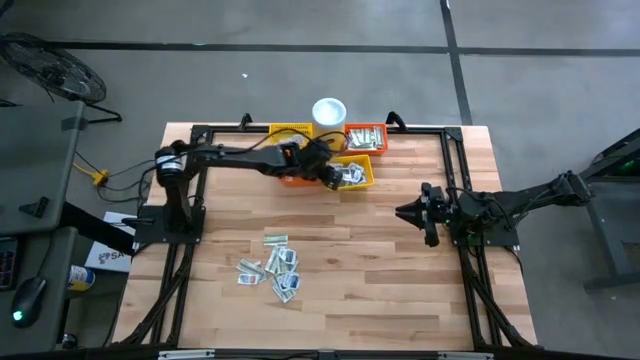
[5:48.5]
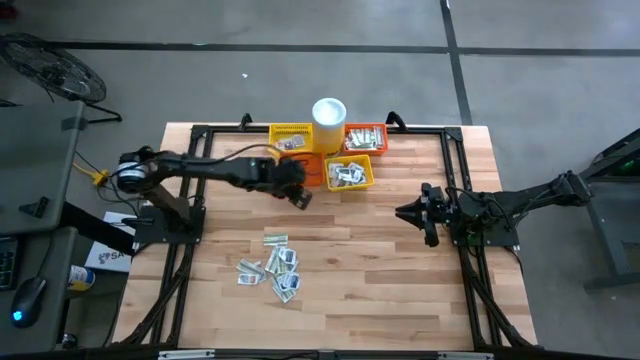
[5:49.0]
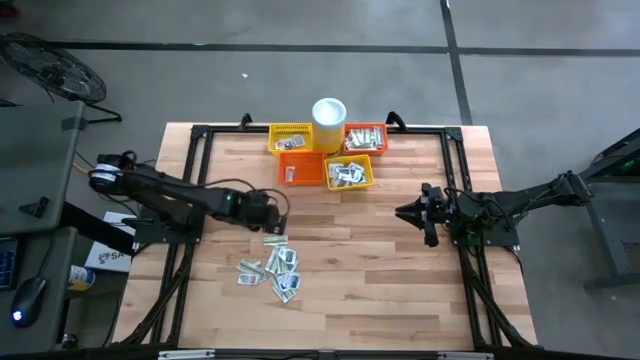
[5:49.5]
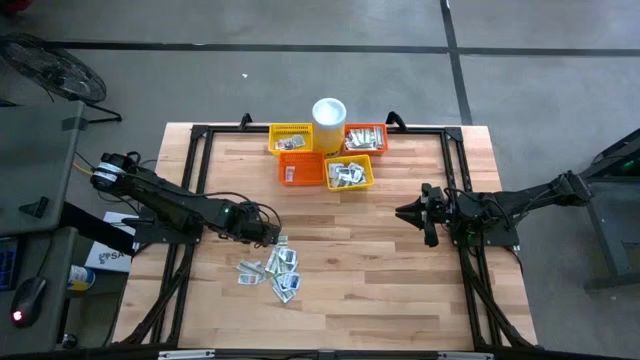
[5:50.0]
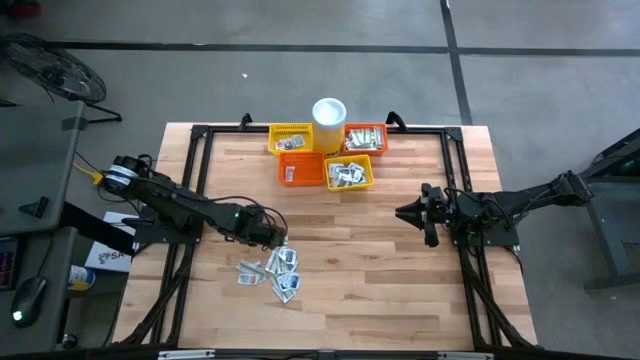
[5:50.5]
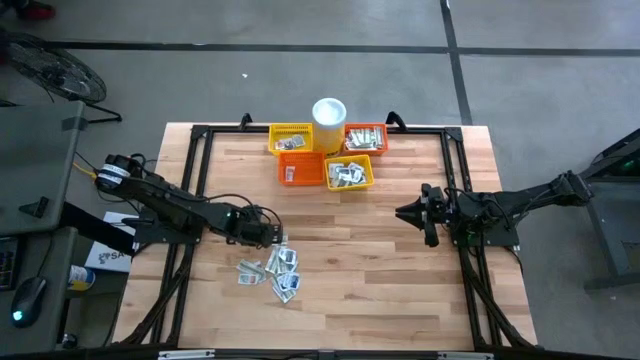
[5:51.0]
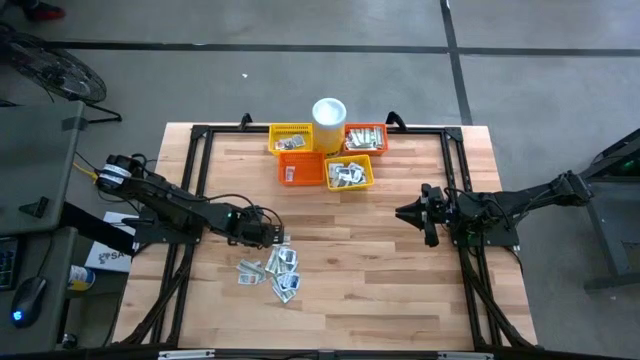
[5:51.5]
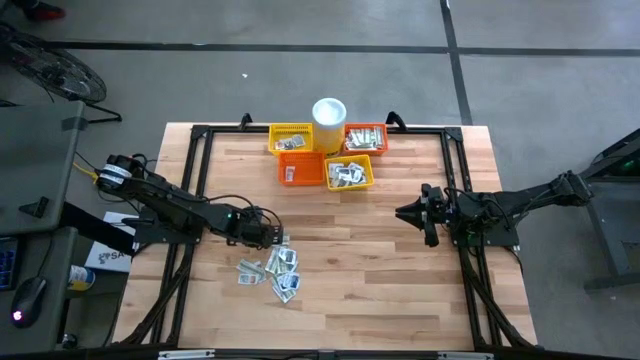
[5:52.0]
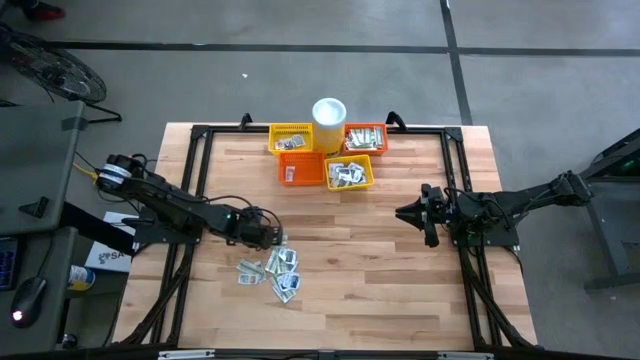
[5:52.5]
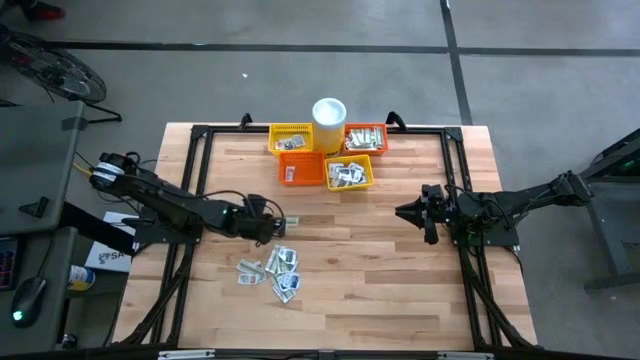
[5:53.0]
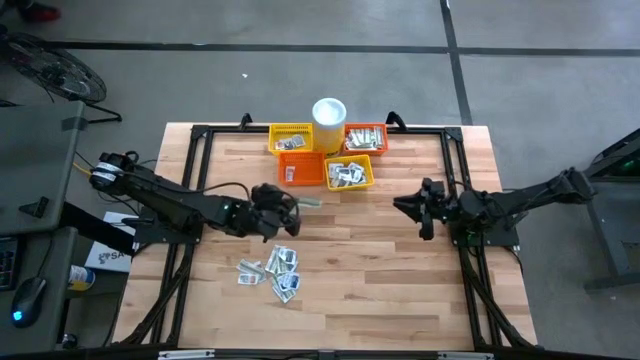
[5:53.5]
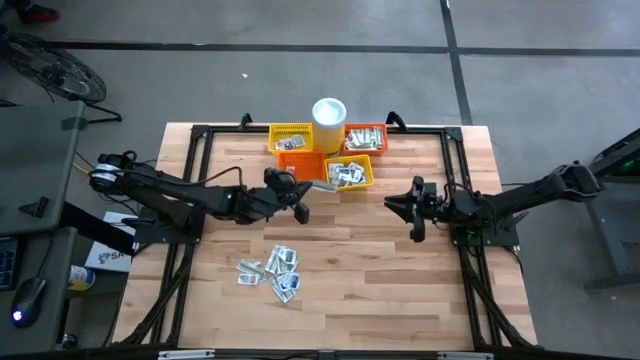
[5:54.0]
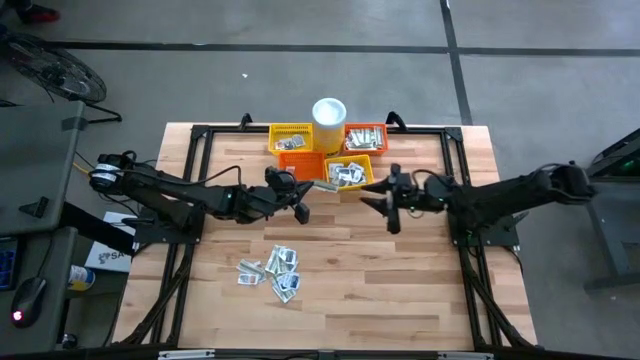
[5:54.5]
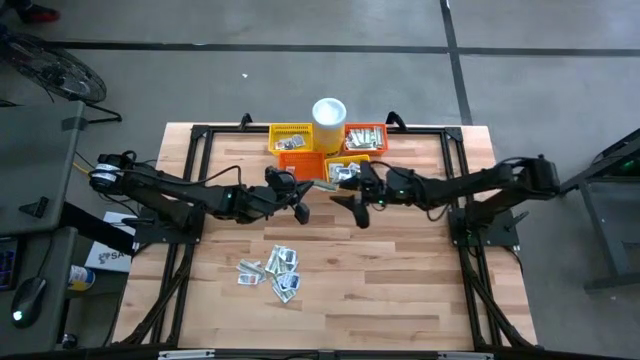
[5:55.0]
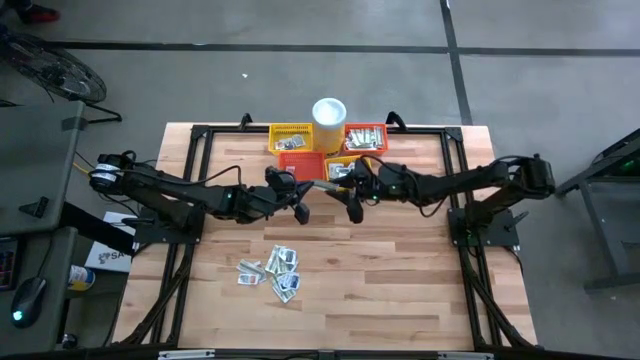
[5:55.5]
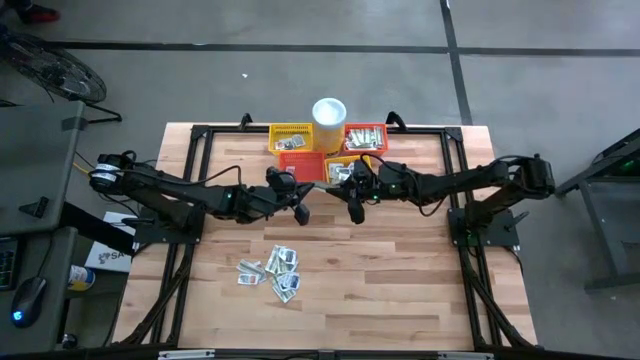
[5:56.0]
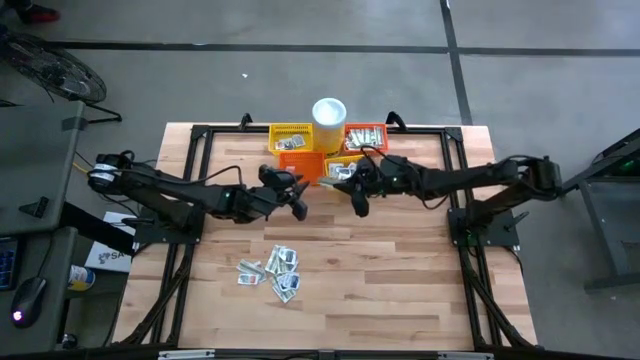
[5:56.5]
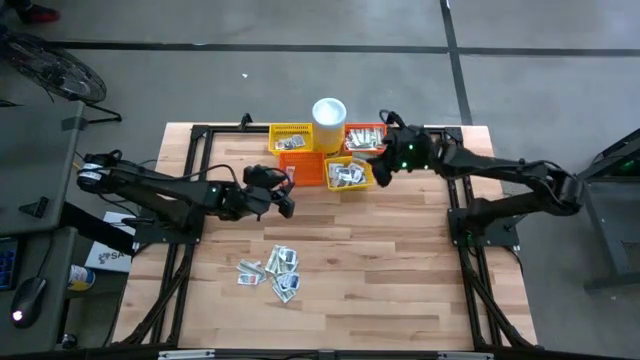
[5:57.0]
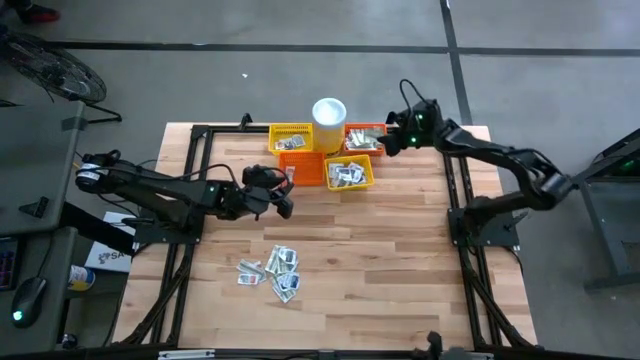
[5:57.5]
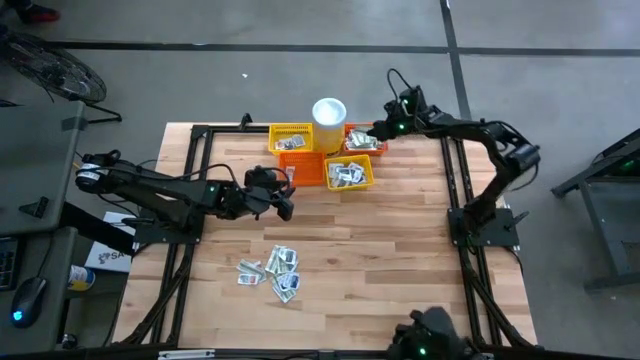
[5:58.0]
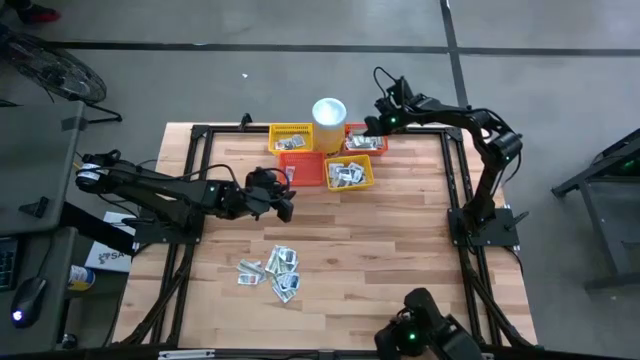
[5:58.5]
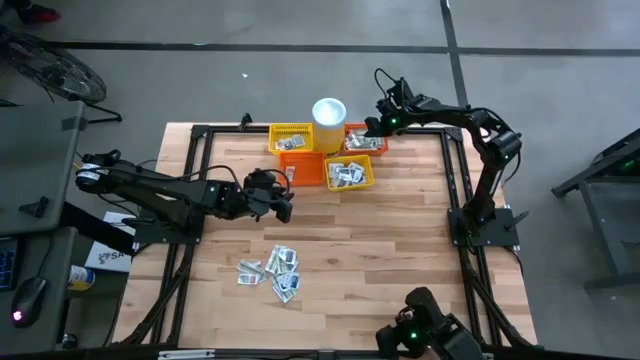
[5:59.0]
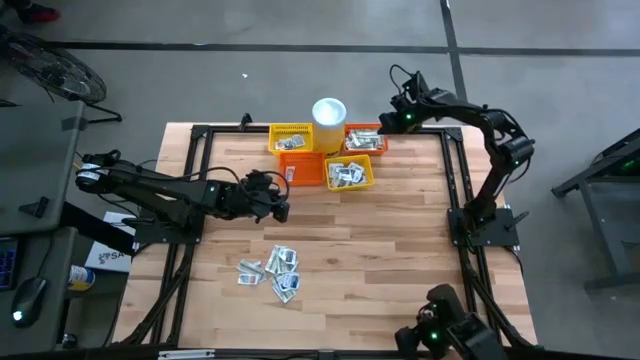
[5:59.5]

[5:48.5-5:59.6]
Task: Pick & Place First Aid Supplies
Put the green bandage pack into the top orange basket

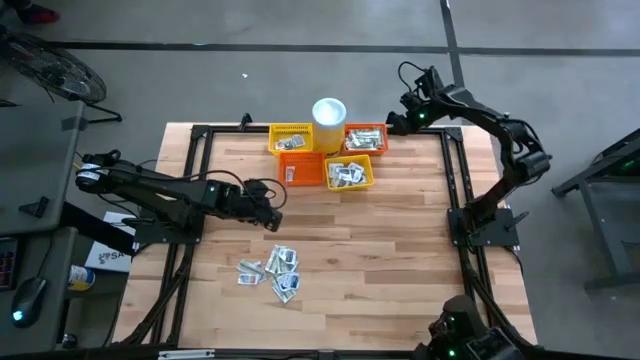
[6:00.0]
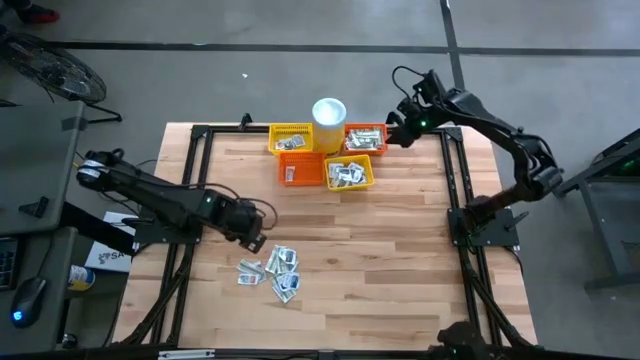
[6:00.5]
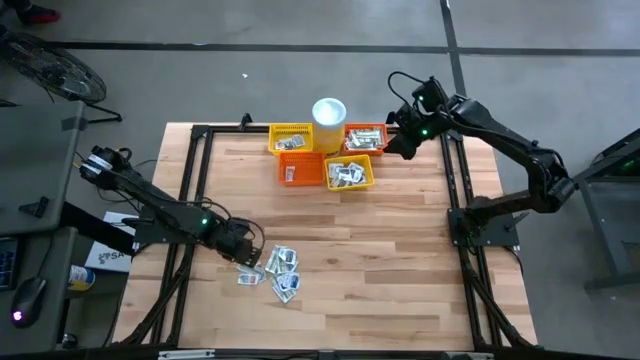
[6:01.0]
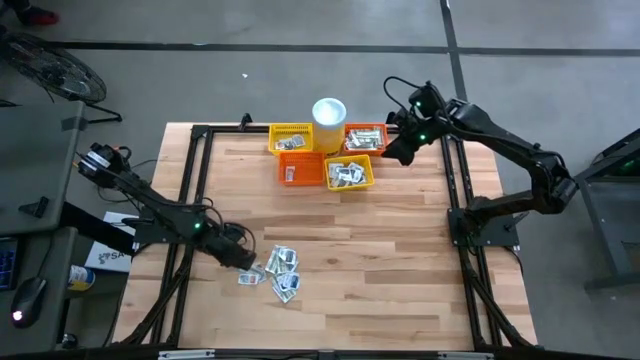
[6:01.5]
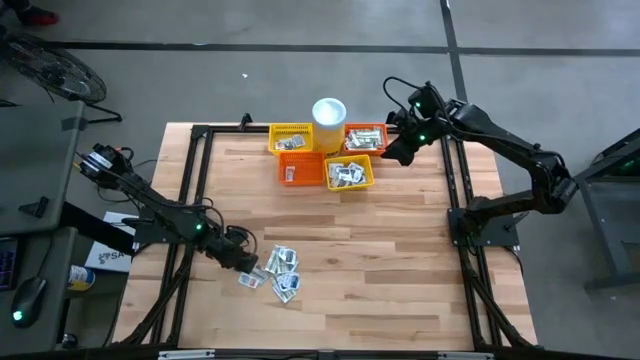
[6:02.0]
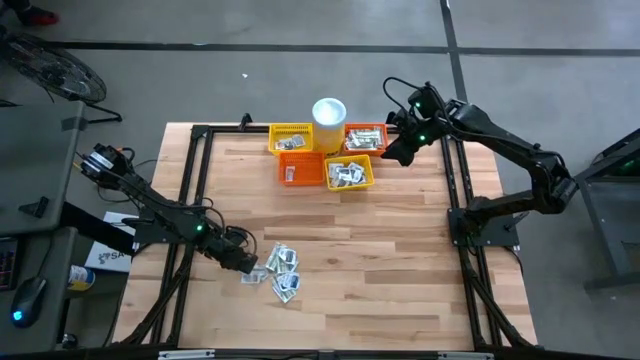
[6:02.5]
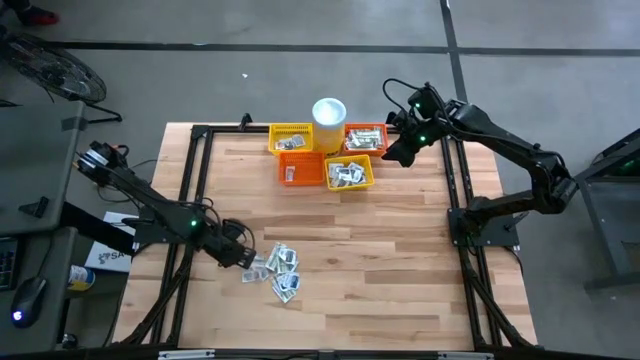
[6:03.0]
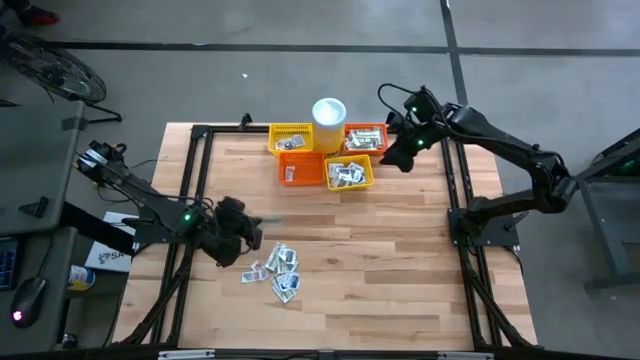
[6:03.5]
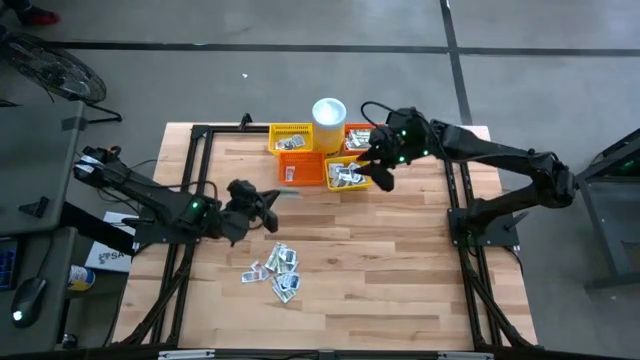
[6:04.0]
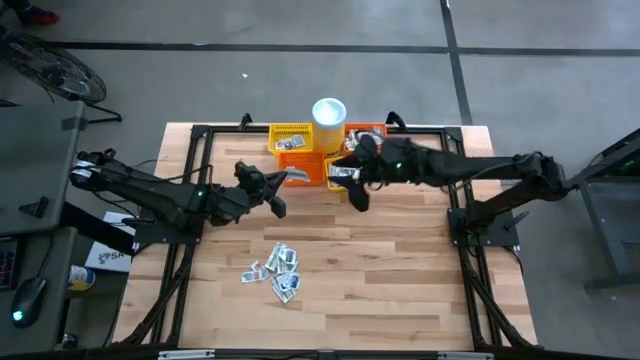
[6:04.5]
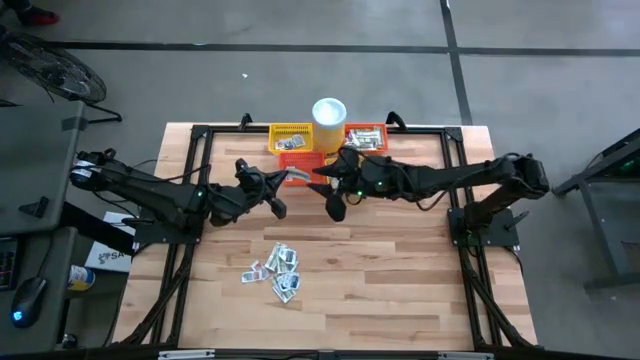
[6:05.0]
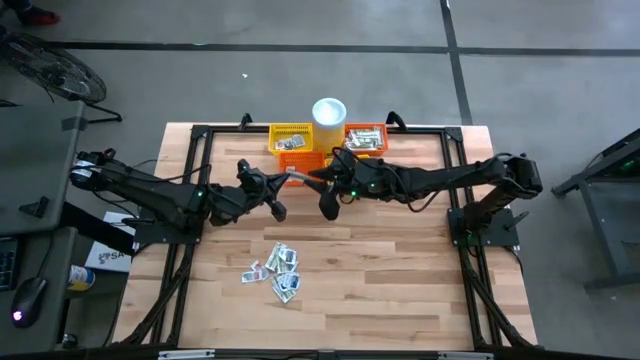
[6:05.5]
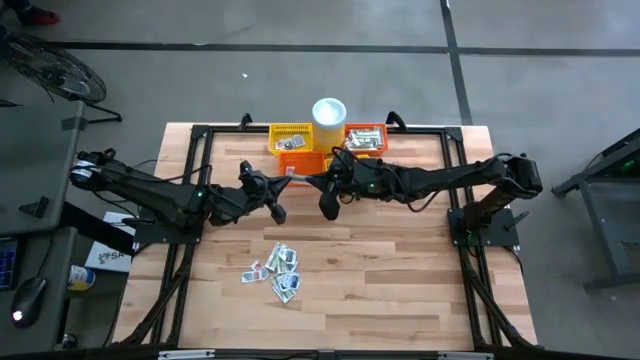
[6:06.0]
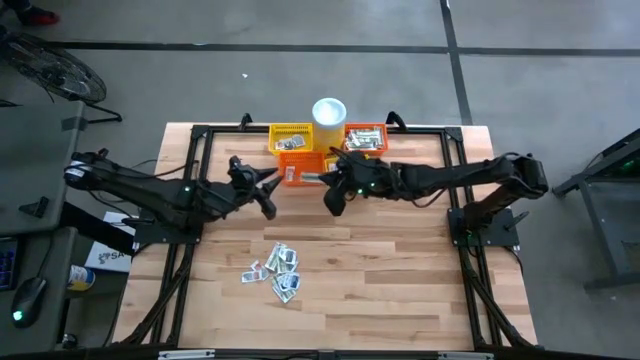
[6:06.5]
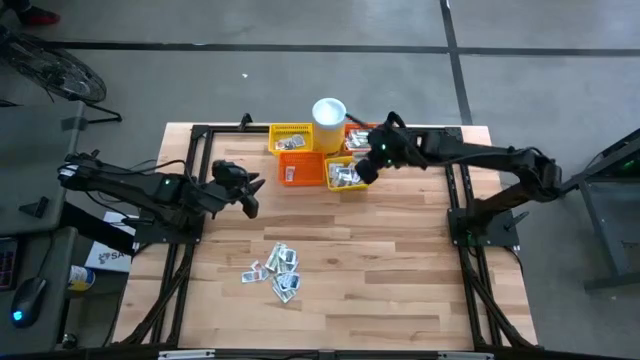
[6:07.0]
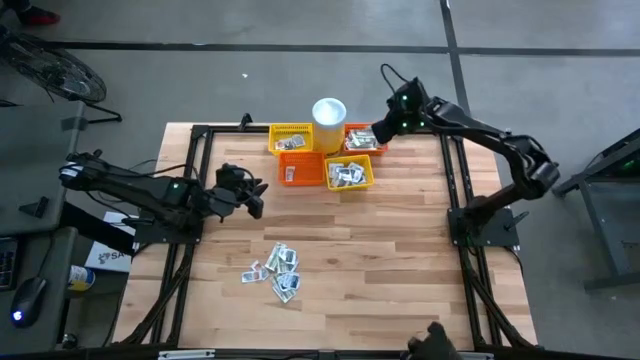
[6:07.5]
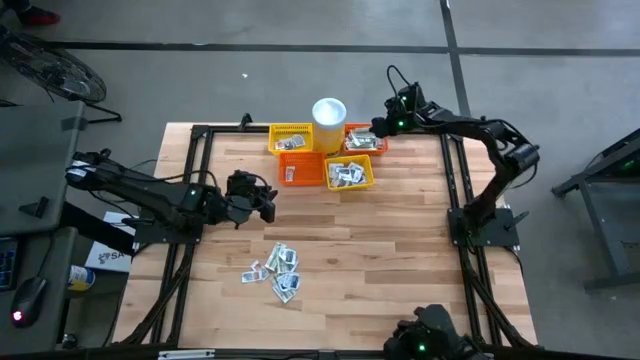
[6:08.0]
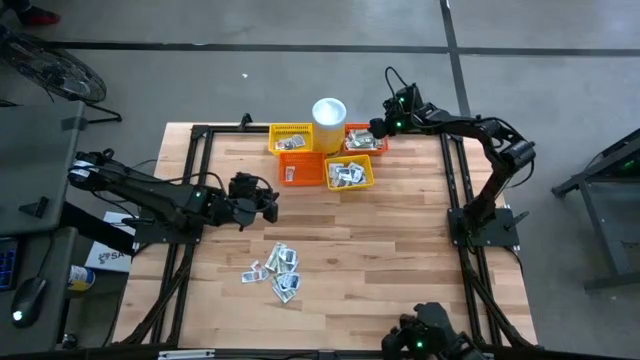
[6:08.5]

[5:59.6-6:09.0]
Put the green bandage pack into the top orange basket
